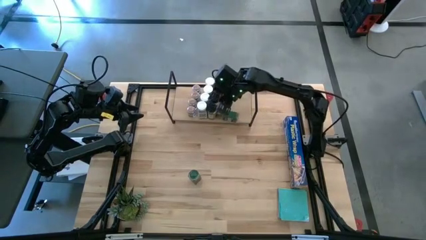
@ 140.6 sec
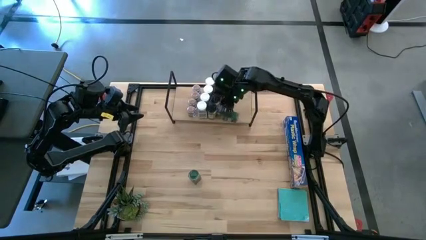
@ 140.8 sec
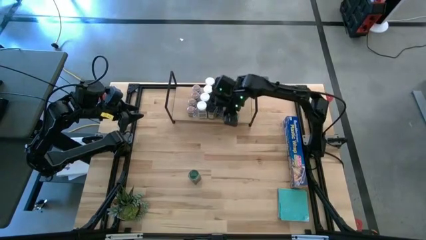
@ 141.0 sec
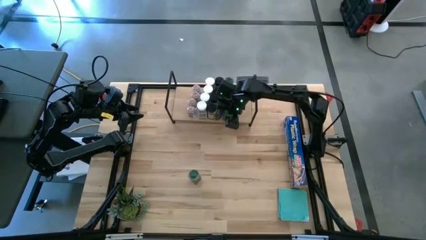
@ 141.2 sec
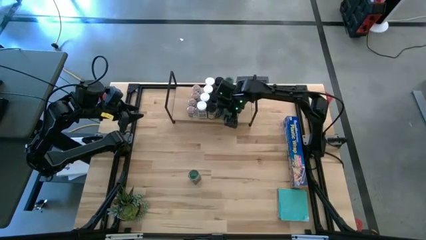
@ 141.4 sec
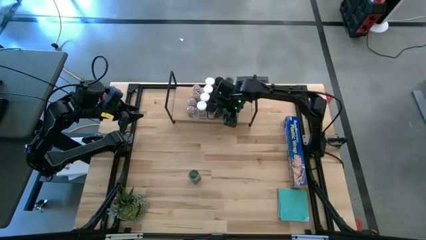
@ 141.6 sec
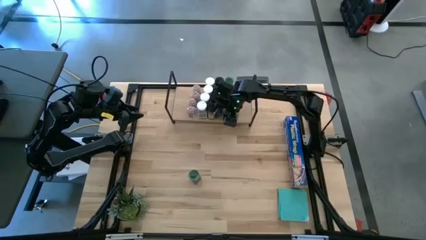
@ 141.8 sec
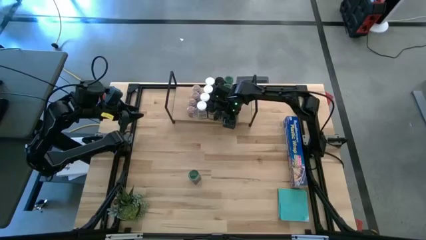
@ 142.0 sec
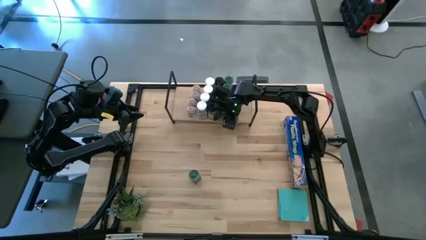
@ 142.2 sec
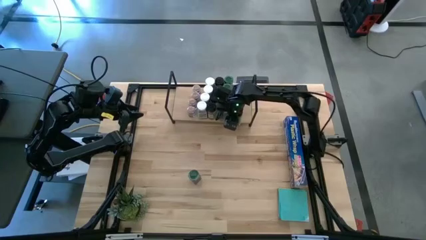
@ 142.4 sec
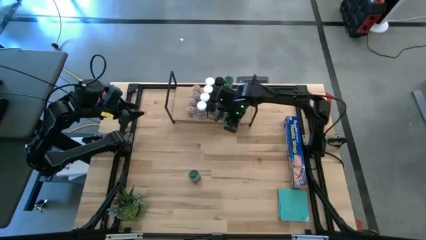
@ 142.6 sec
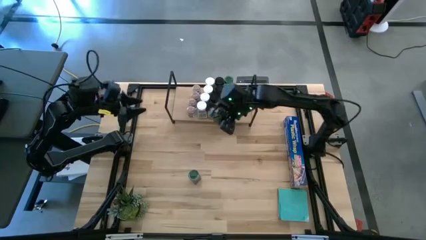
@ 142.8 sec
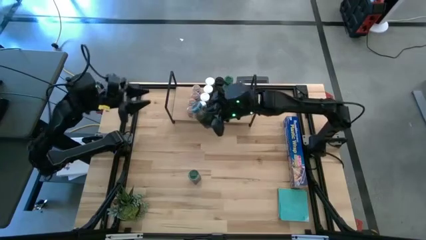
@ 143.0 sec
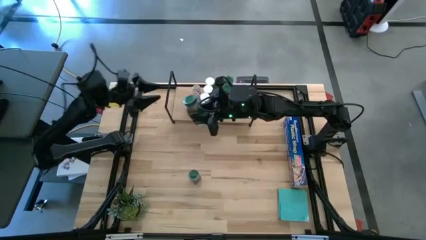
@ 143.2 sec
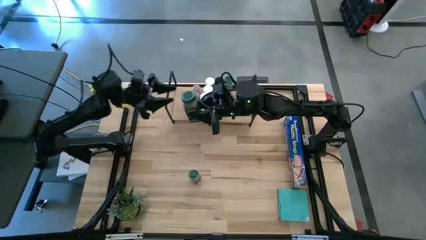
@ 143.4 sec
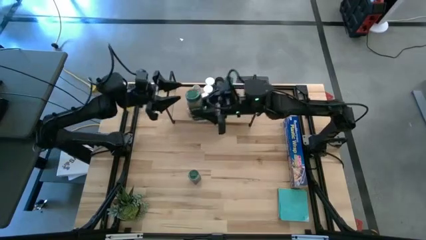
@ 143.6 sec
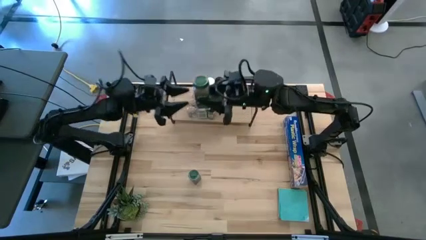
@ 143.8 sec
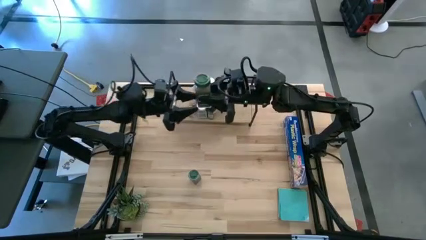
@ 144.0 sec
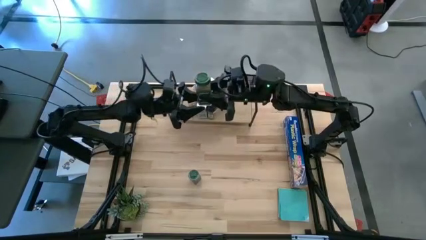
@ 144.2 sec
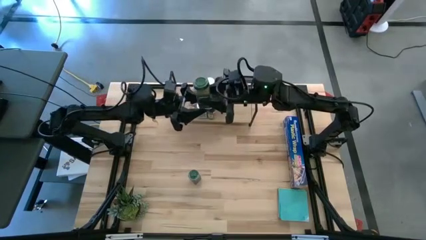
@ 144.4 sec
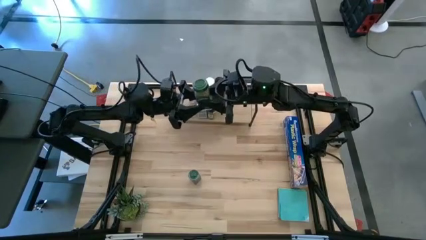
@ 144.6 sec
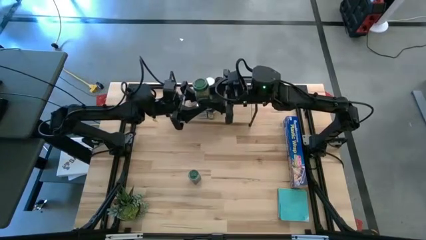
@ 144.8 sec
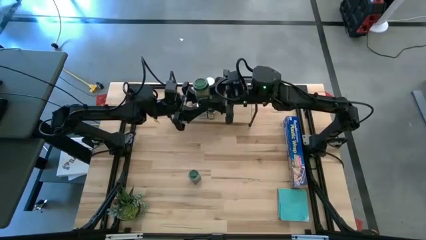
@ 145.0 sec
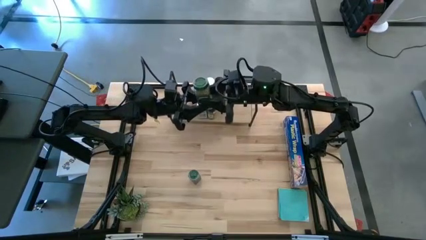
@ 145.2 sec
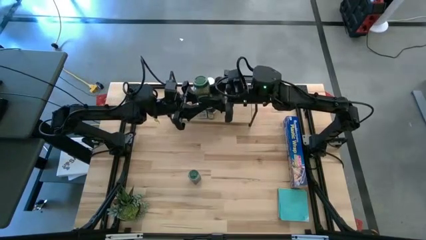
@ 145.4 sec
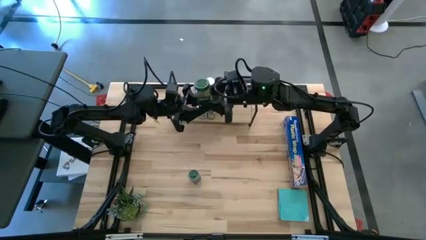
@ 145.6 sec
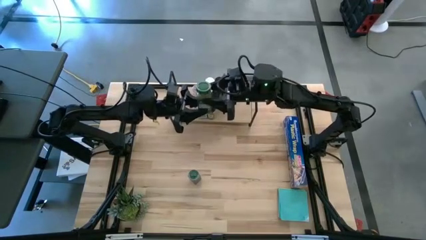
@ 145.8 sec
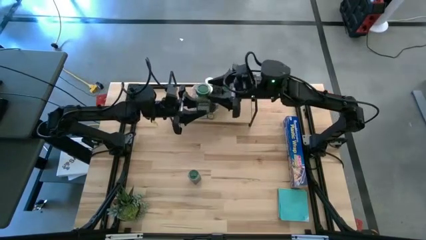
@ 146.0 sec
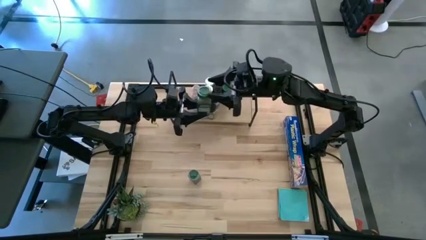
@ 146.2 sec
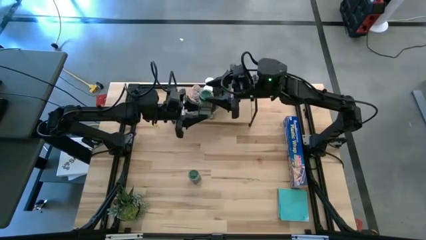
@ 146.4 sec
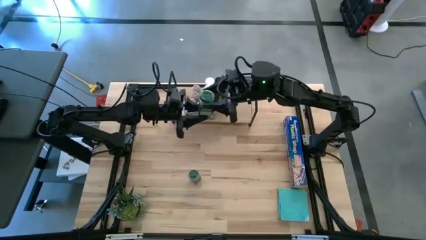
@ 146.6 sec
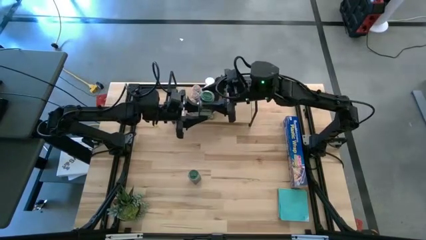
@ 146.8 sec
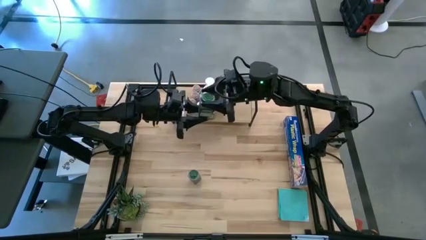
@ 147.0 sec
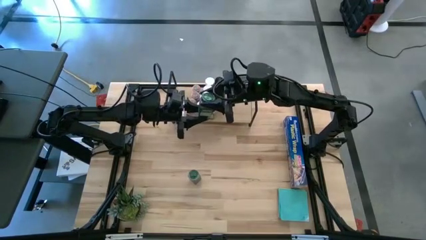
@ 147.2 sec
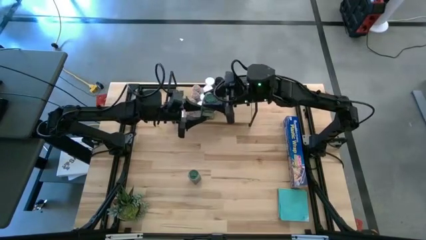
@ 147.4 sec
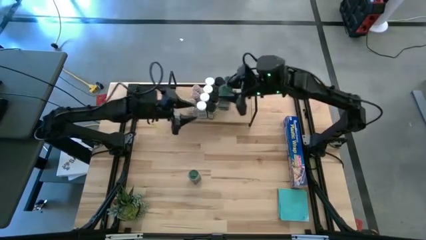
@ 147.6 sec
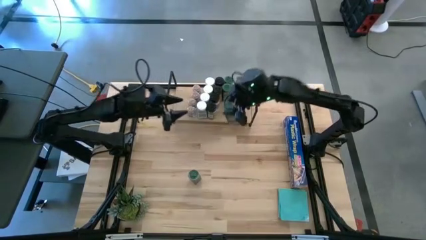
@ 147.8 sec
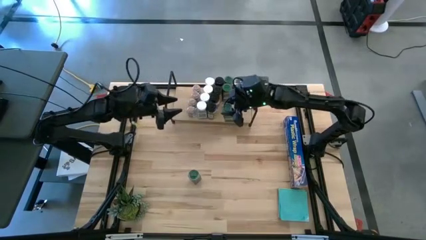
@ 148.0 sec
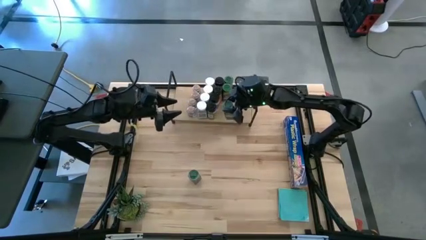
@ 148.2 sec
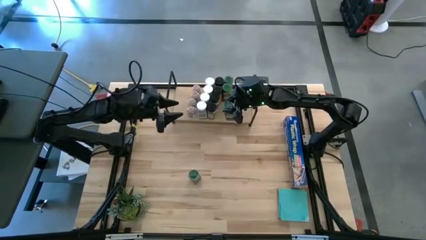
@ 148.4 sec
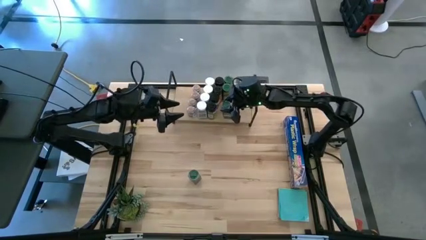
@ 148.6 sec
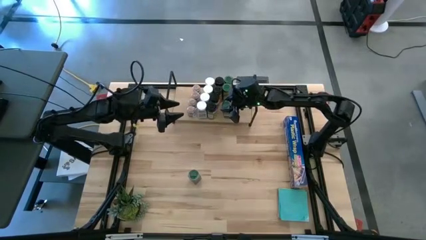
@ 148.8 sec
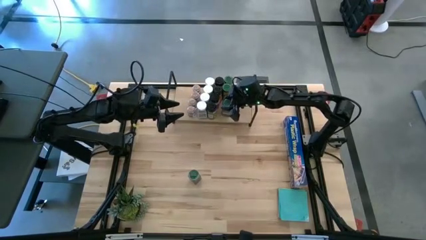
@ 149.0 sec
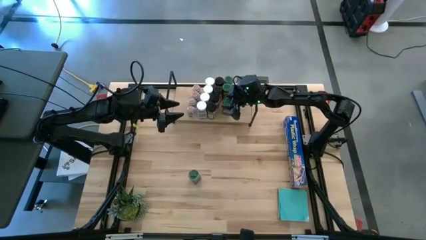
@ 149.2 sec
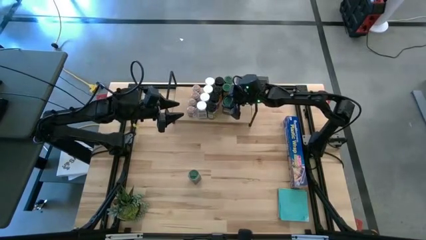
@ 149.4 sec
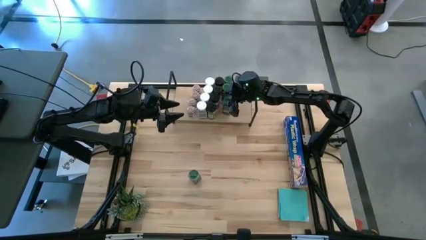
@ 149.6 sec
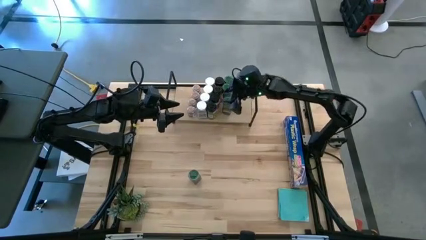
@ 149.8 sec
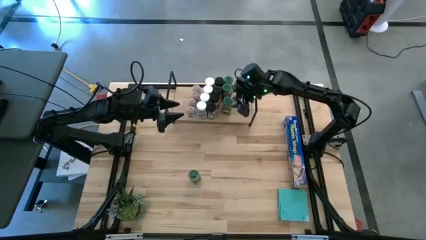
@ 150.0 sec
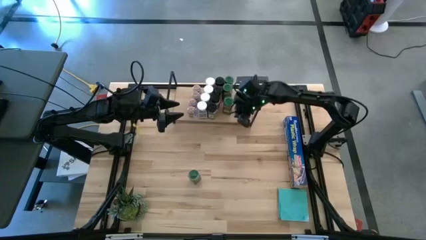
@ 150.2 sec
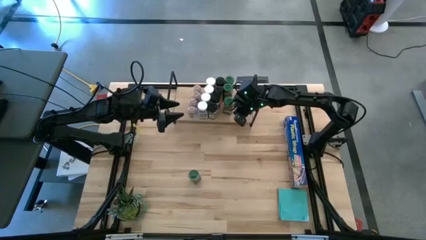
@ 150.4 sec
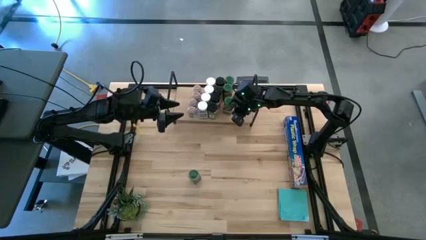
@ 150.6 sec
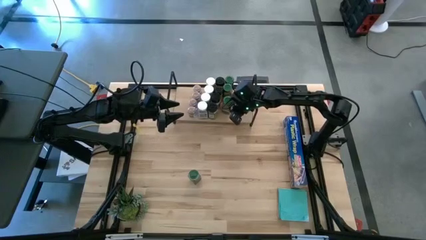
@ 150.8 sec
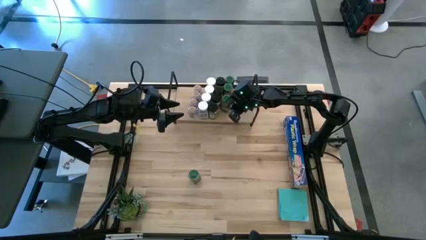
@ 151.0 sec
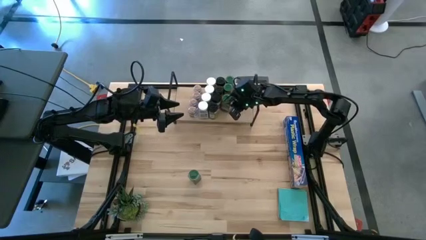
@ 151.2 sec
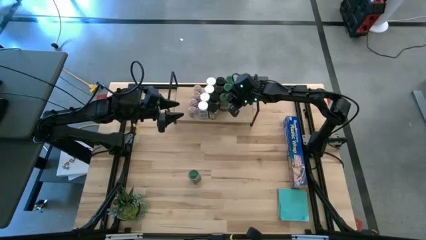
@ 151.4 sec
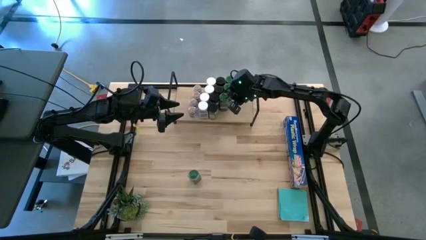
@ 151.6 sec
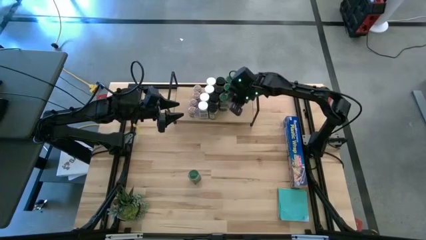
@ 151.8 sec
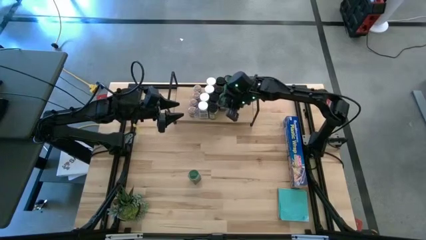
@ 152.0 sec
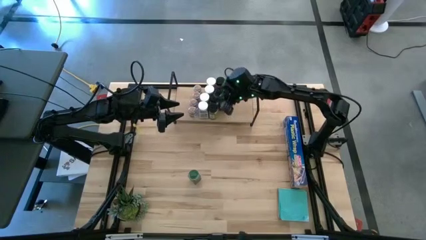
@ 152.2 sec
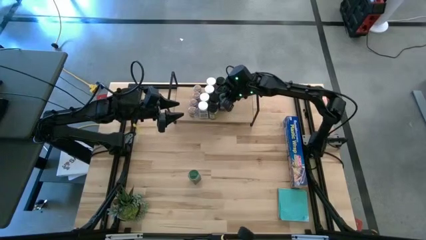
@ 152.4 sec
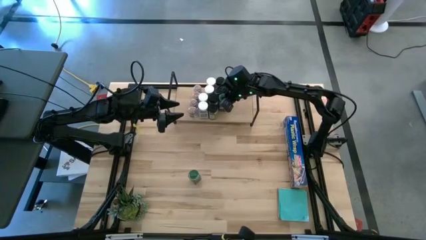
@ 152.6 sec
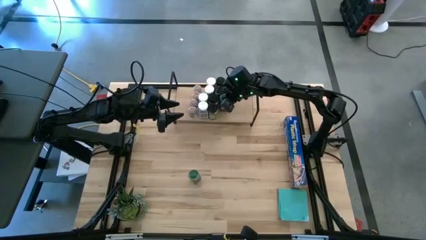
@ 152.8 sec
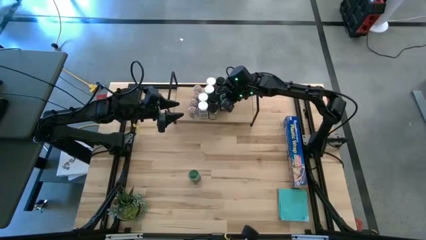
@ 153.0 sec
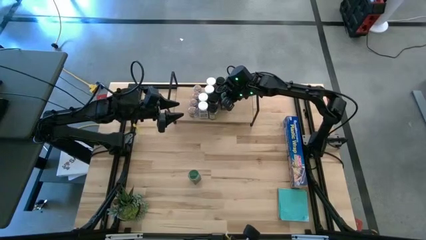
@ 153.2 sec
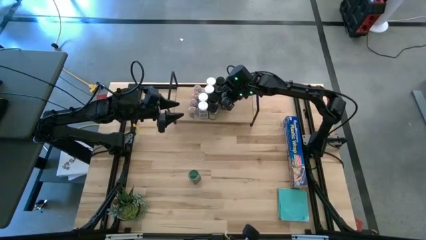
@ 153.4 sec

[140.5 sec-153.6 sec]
Task: Shelf spices
Put the top green seasoning bottle on the shelf aligned with the other green seasoning bottle
